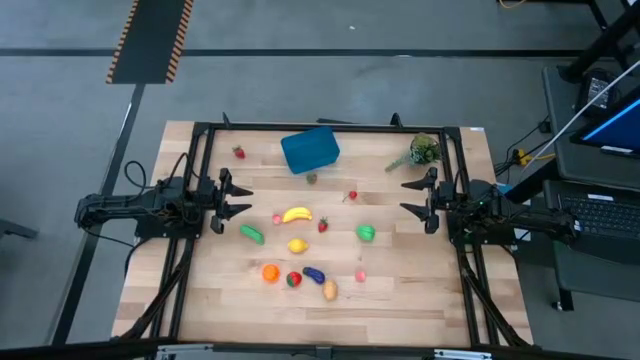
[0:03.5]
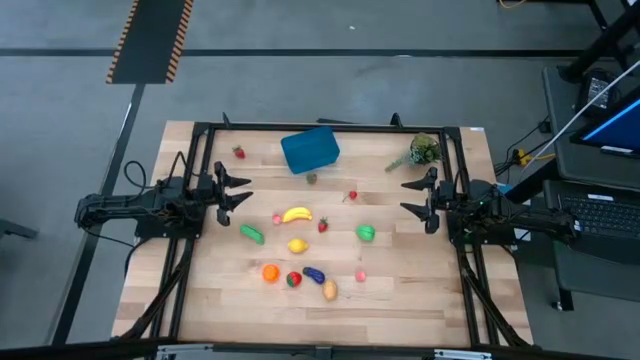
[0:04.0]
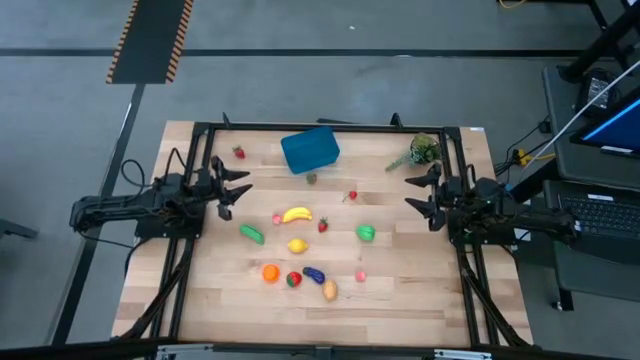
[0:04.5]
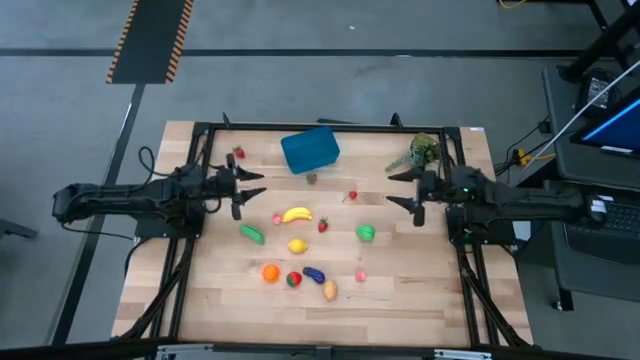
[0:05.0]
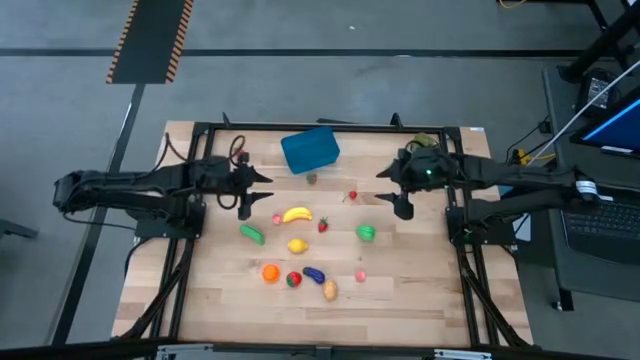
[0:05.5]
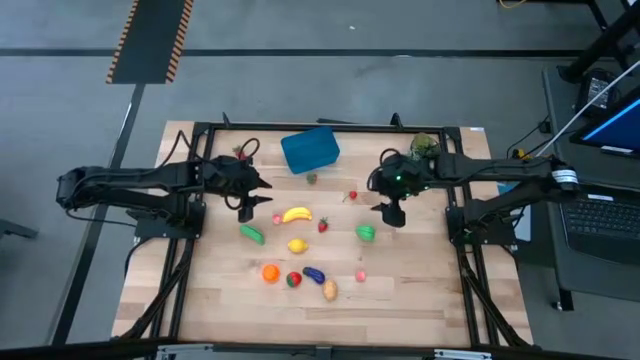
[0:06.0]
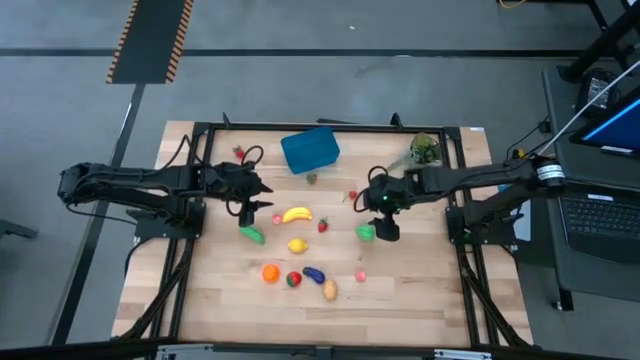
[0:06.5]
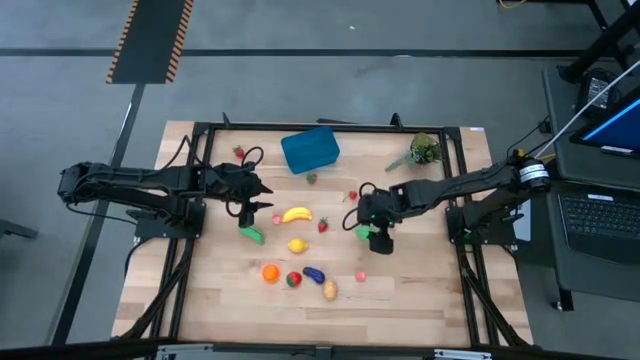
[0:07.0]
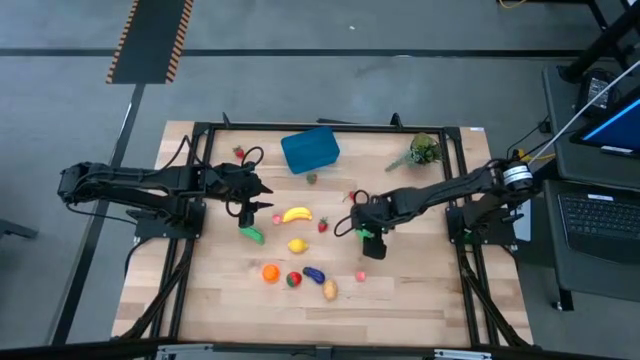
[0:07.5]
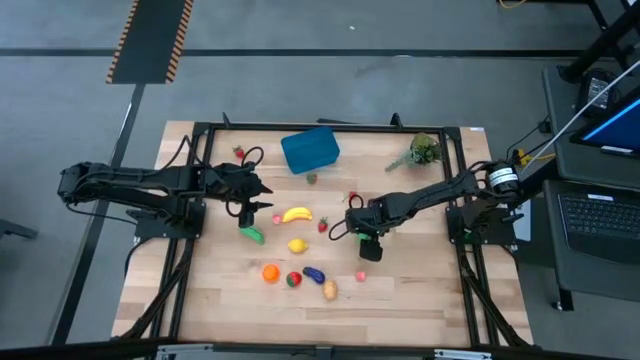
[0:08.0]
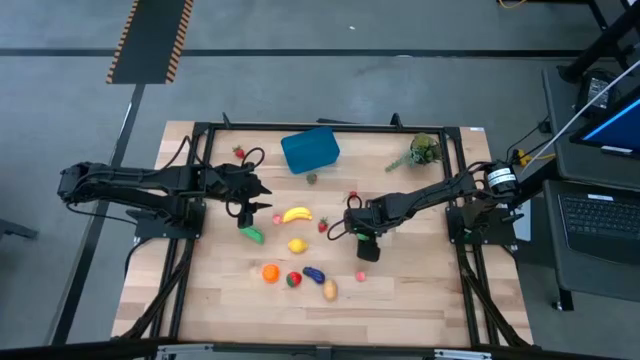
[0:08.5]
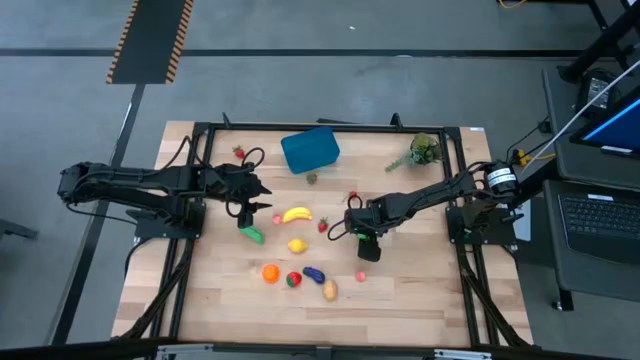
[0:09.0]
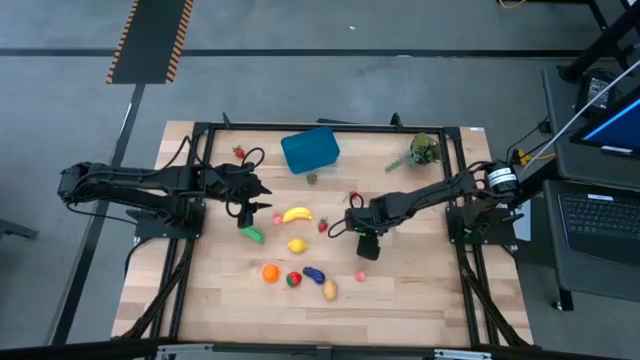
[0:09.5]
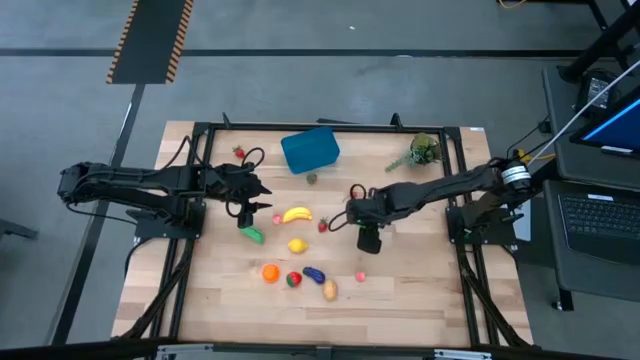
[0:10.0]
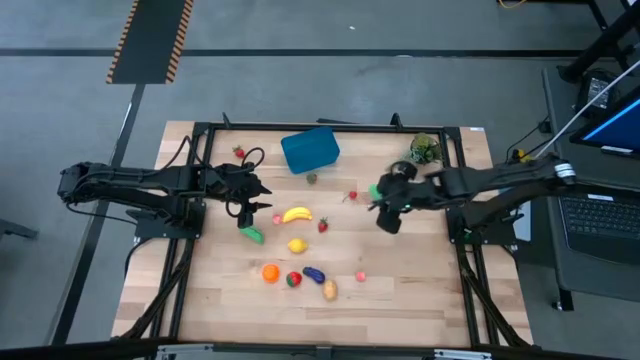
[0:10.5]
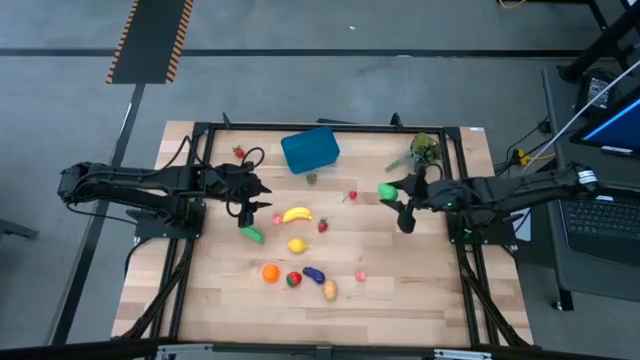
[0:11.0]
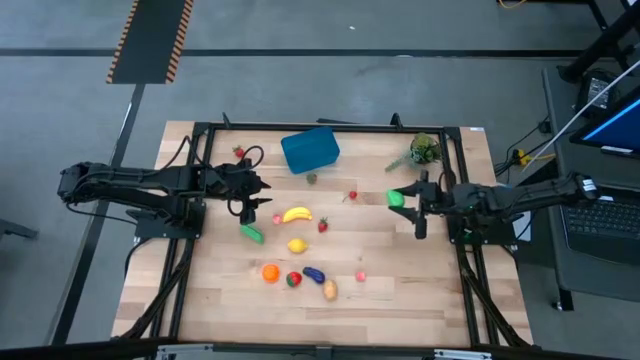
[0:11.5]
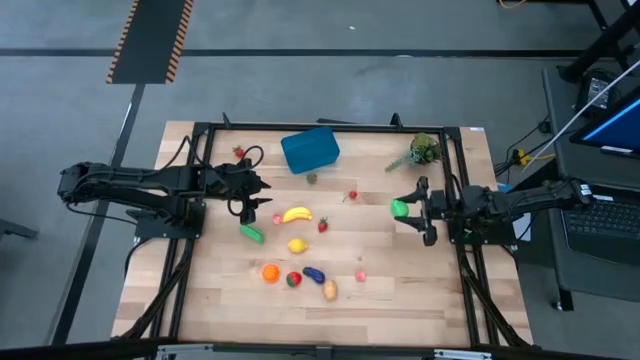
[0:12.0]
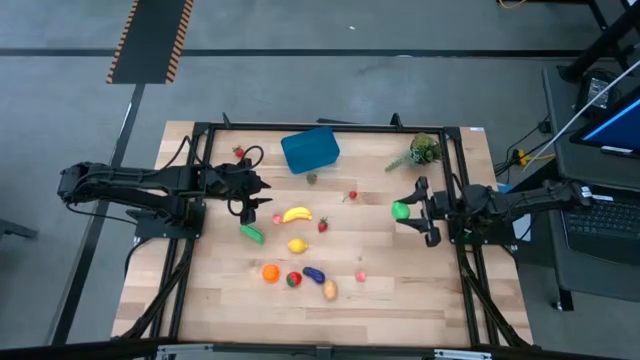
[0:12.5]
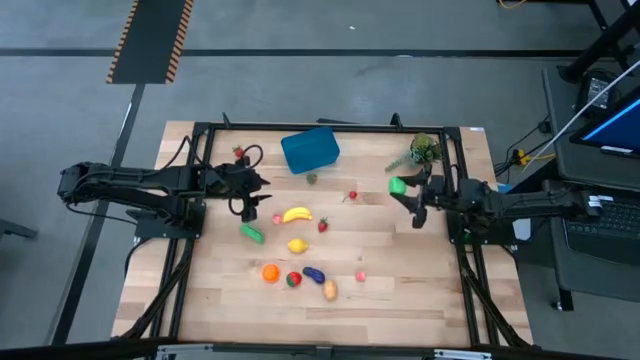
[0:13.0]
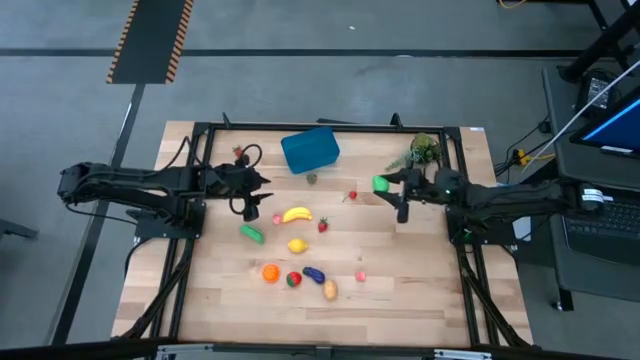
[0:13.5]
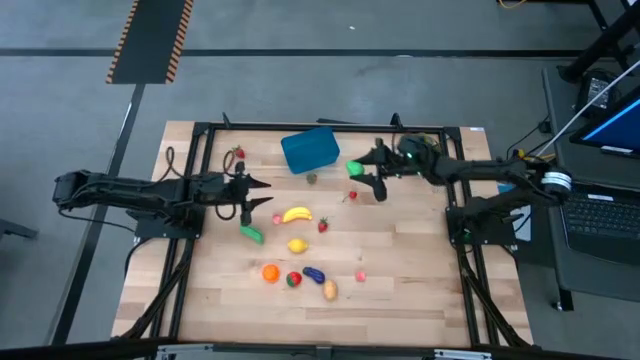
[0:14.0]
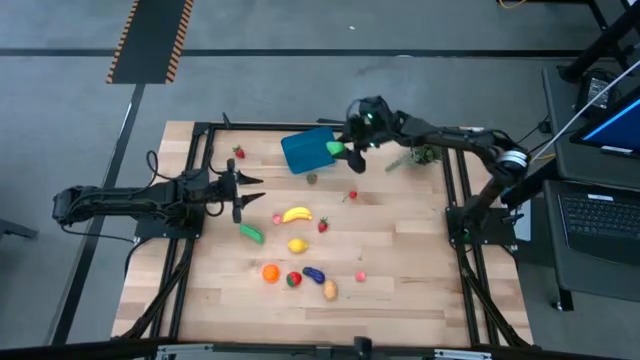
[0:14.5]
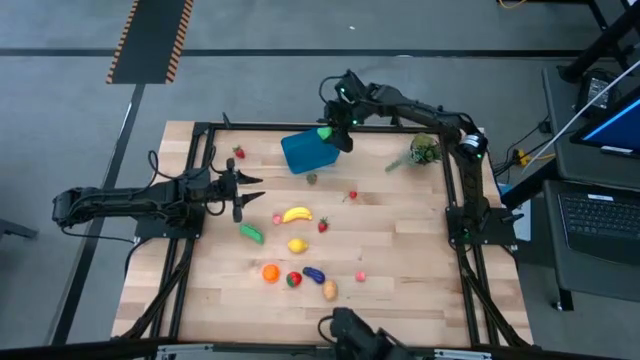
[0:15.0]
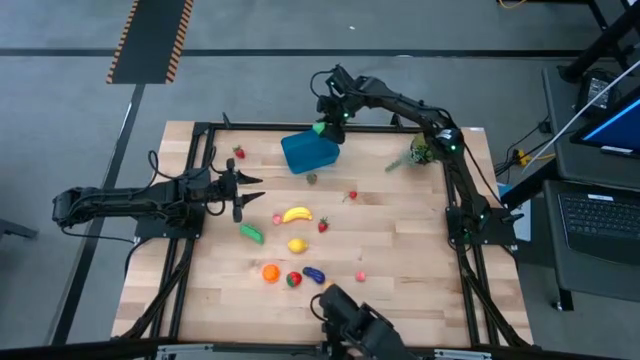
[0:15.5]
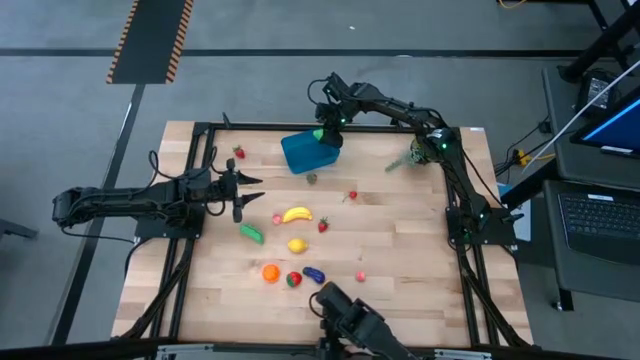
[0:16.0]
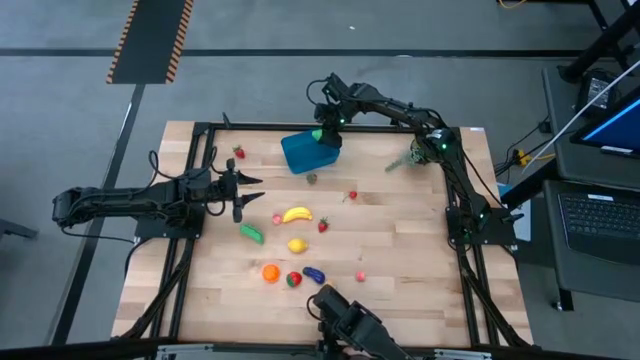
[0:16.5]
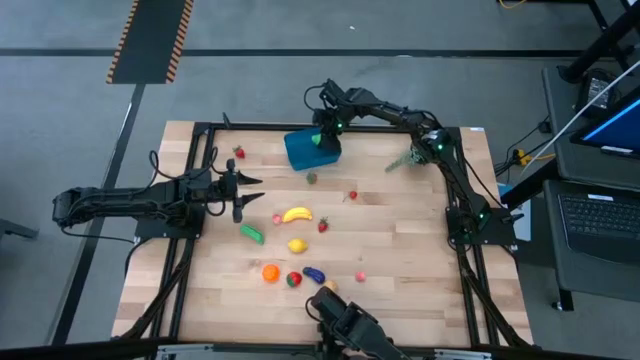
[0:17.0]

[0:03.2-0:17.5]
Task: Pick and placing Produce into tupperware
Put the pear into the blue bin

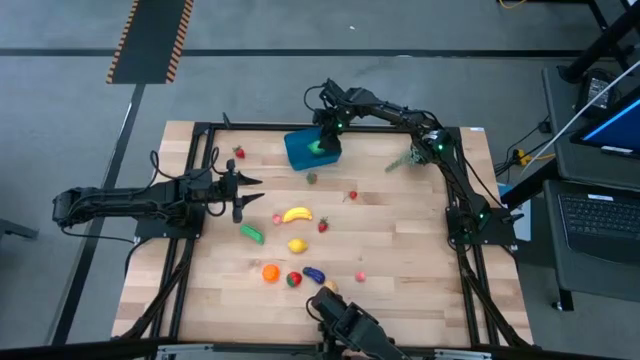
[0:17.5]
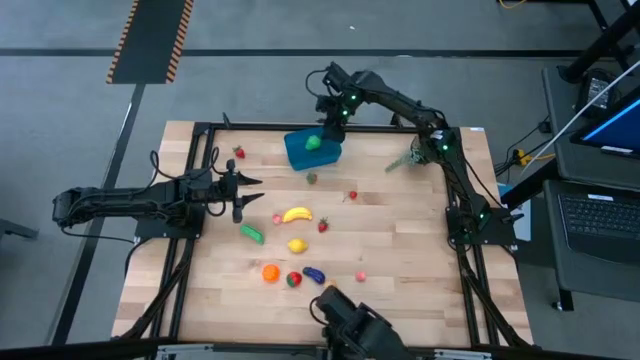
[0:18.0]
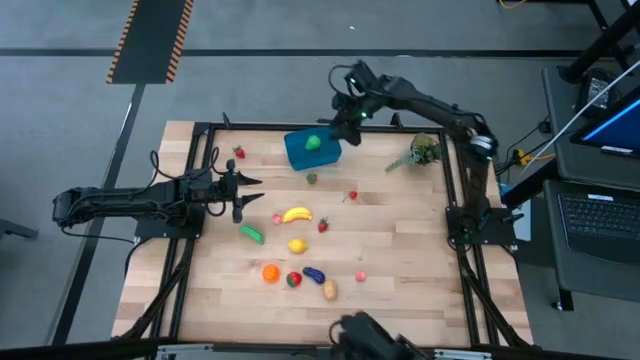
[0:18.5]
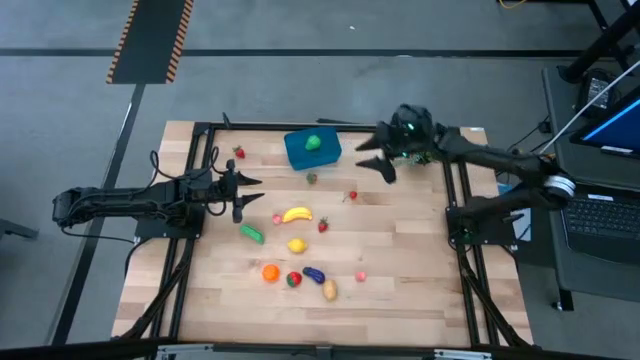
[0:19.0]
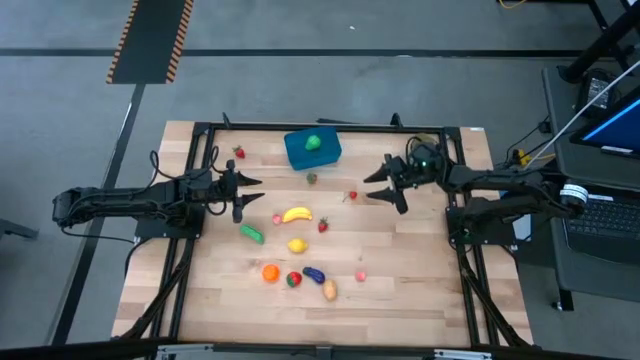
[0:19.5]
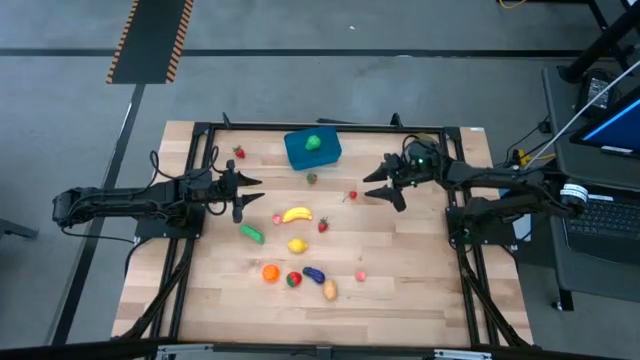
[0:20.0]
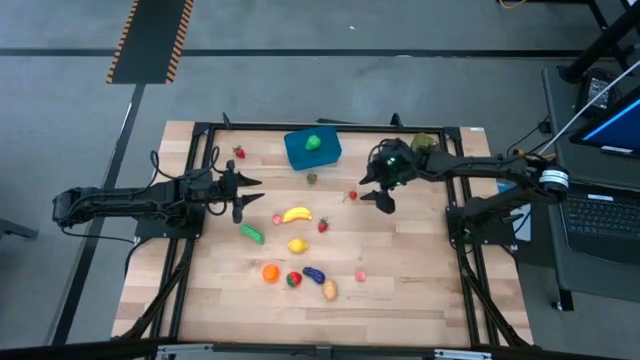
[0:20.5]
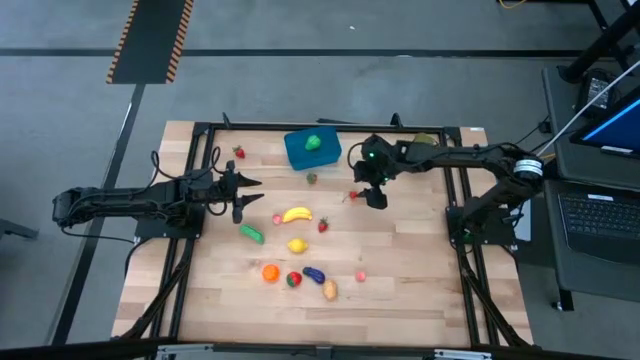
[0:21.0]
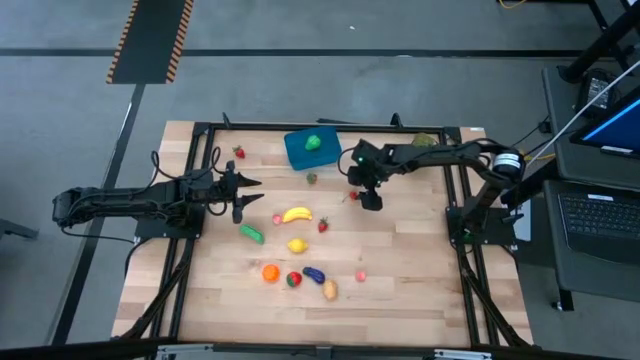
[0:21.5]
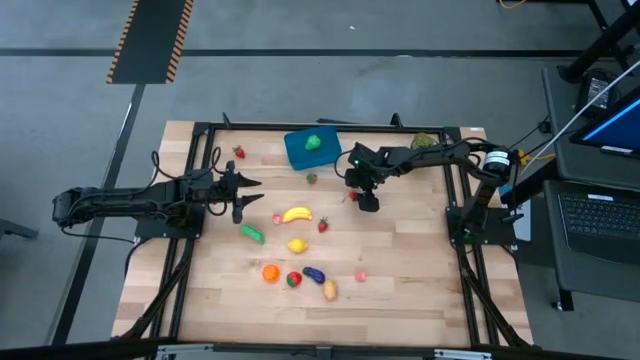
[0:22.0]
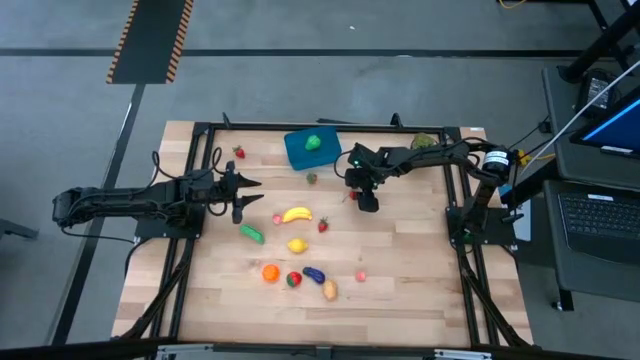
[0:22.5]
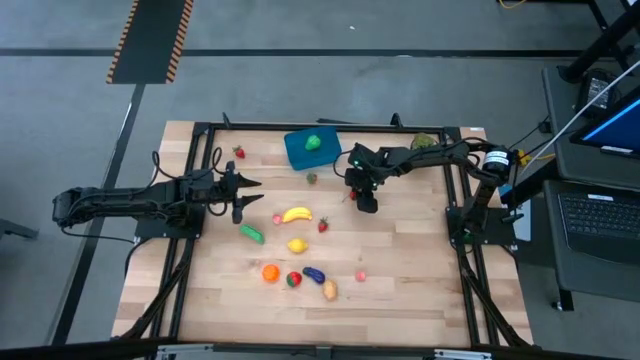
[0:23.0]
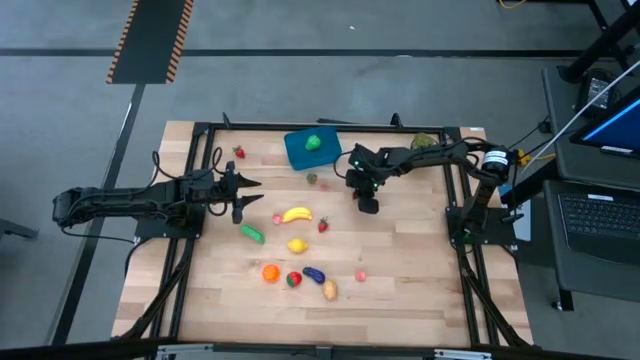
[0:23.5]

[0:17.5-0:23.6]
Put the cherry into the blue bin
